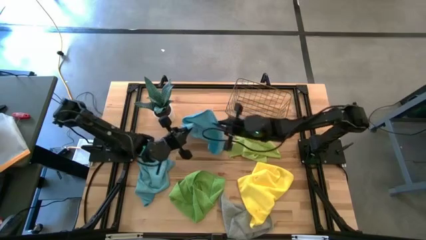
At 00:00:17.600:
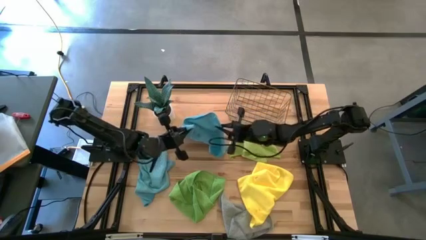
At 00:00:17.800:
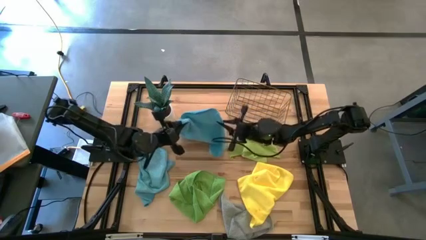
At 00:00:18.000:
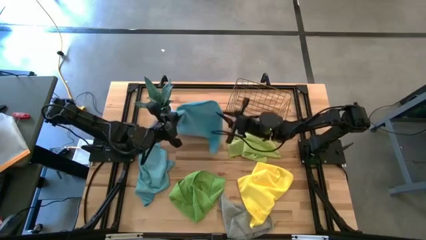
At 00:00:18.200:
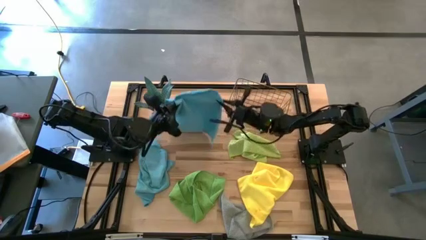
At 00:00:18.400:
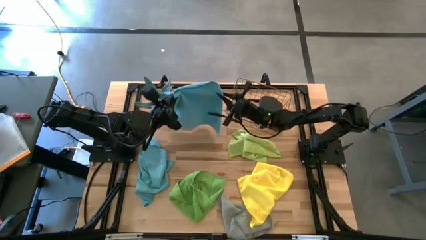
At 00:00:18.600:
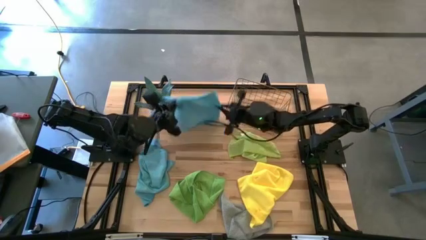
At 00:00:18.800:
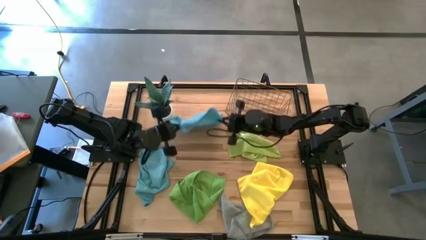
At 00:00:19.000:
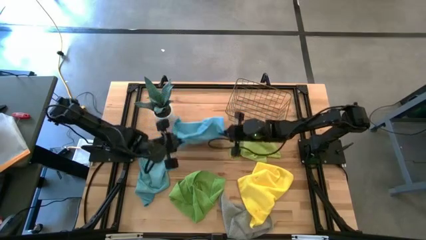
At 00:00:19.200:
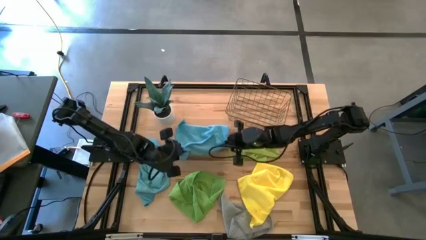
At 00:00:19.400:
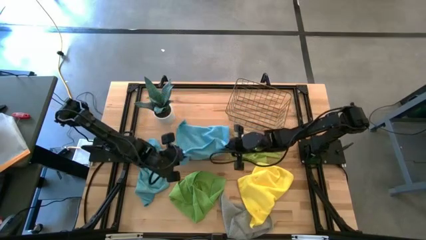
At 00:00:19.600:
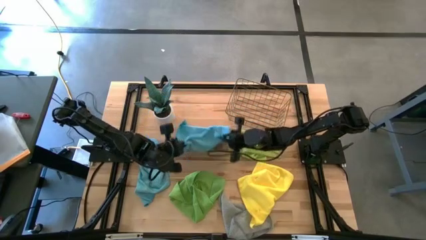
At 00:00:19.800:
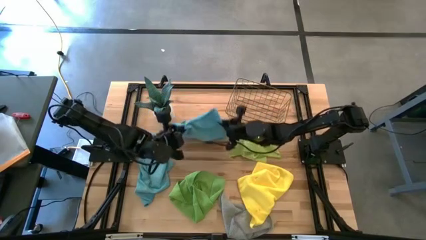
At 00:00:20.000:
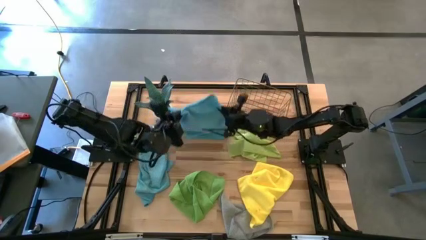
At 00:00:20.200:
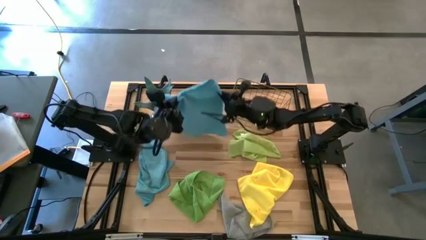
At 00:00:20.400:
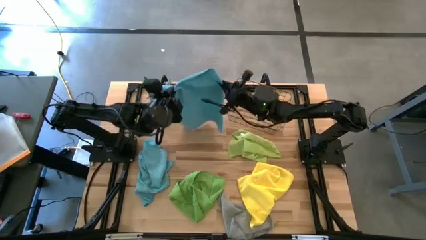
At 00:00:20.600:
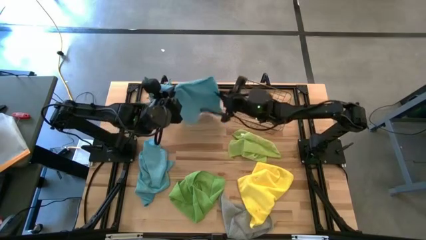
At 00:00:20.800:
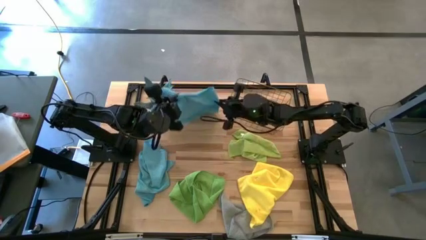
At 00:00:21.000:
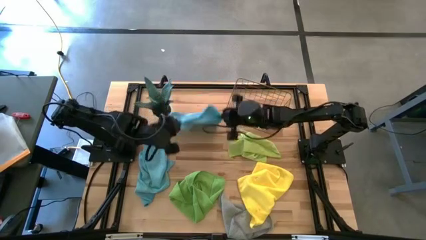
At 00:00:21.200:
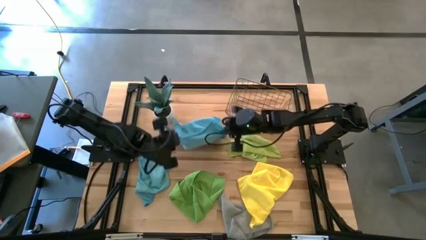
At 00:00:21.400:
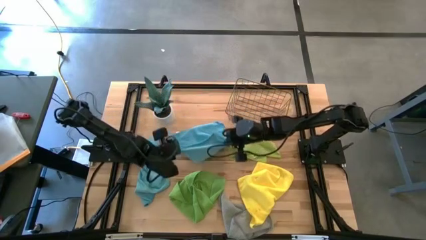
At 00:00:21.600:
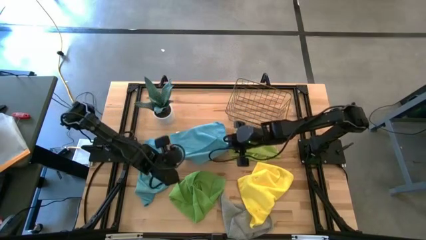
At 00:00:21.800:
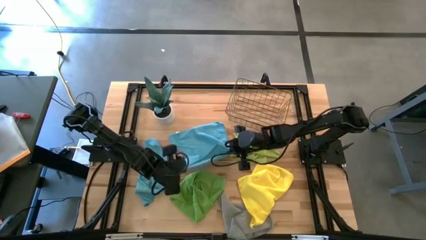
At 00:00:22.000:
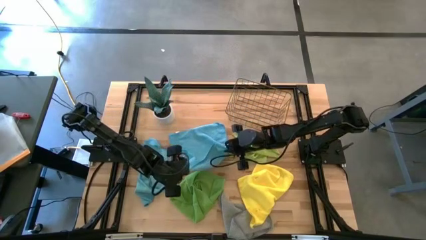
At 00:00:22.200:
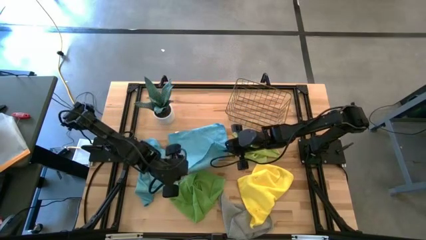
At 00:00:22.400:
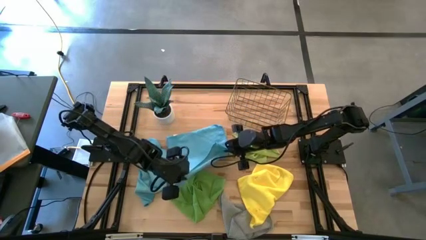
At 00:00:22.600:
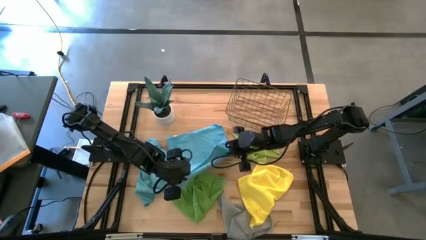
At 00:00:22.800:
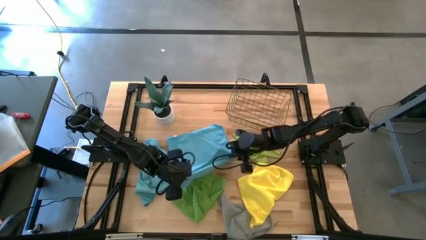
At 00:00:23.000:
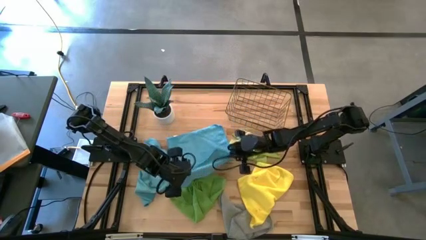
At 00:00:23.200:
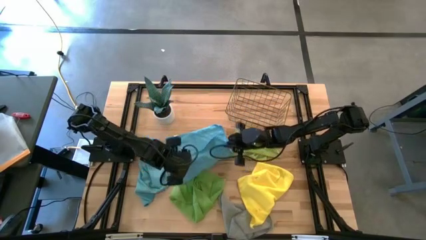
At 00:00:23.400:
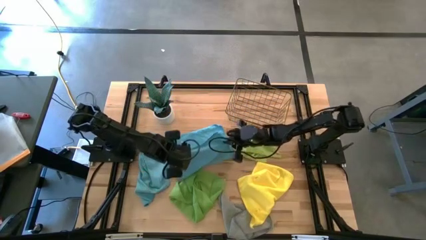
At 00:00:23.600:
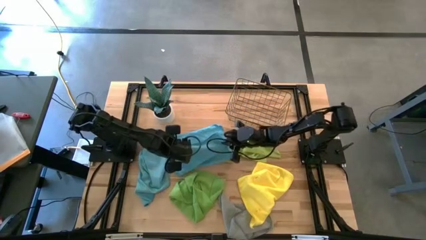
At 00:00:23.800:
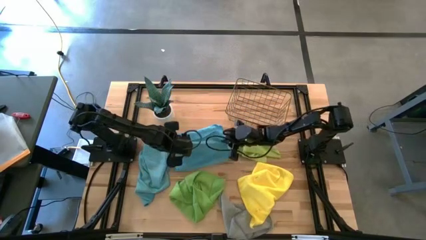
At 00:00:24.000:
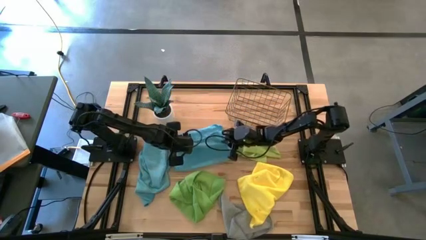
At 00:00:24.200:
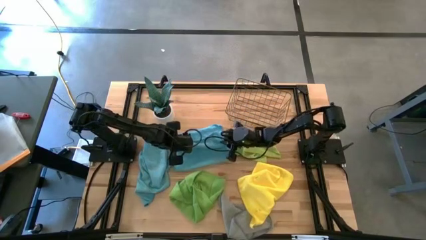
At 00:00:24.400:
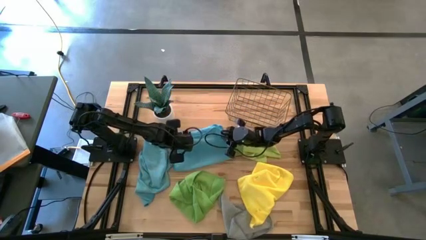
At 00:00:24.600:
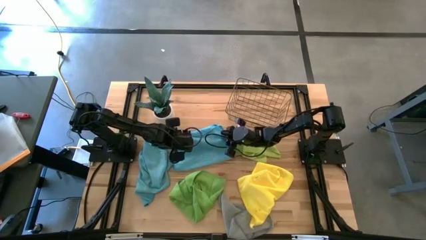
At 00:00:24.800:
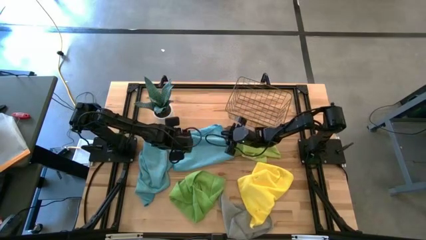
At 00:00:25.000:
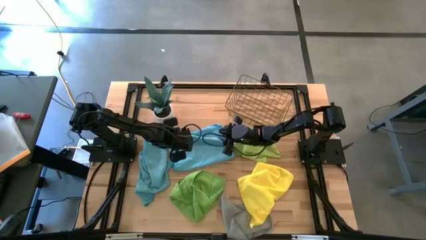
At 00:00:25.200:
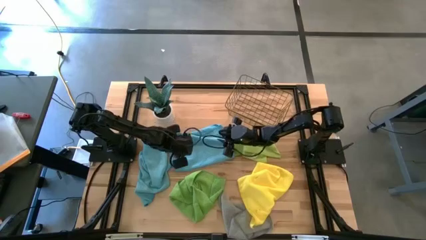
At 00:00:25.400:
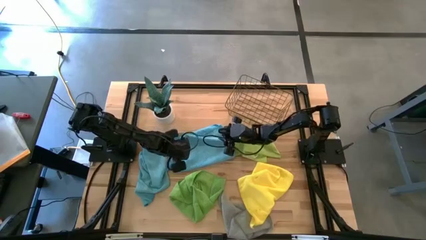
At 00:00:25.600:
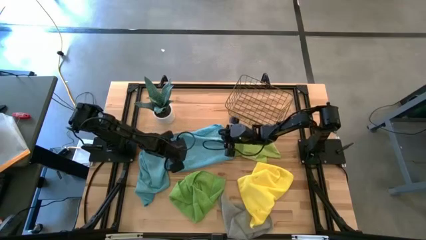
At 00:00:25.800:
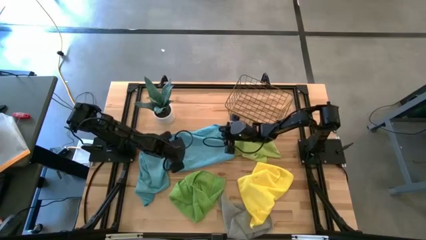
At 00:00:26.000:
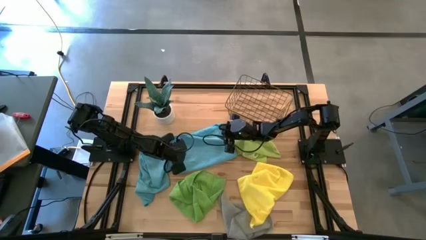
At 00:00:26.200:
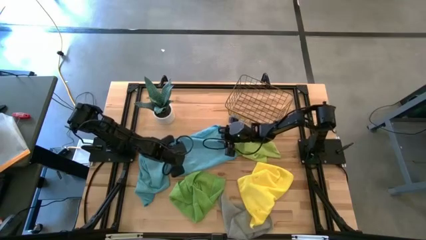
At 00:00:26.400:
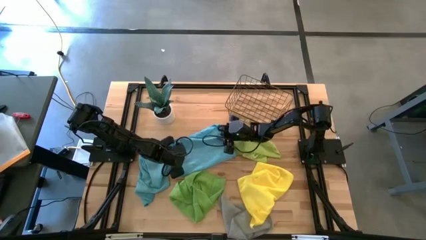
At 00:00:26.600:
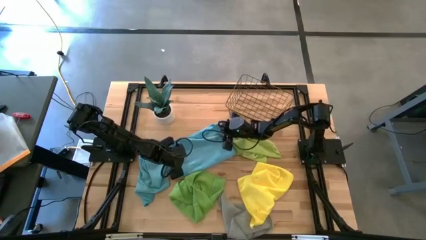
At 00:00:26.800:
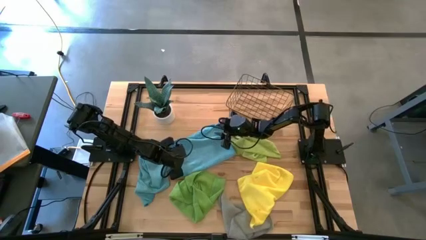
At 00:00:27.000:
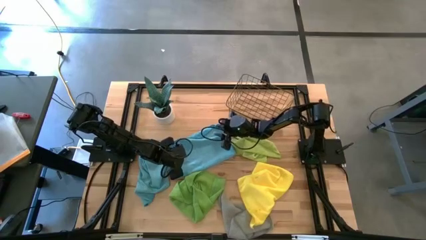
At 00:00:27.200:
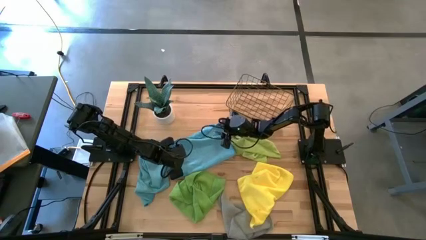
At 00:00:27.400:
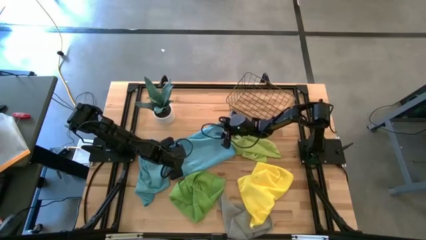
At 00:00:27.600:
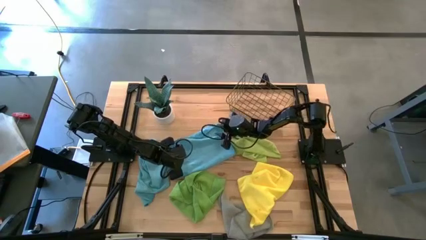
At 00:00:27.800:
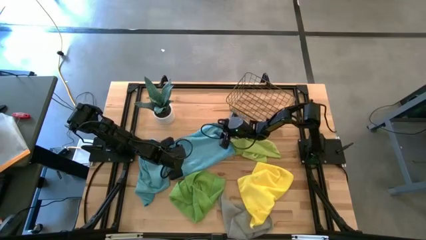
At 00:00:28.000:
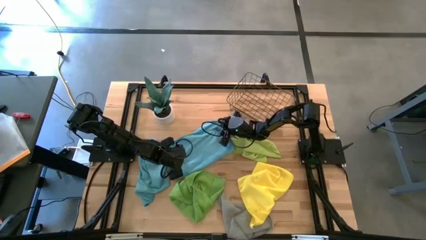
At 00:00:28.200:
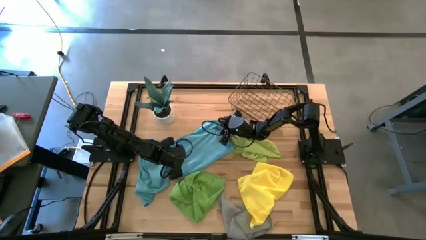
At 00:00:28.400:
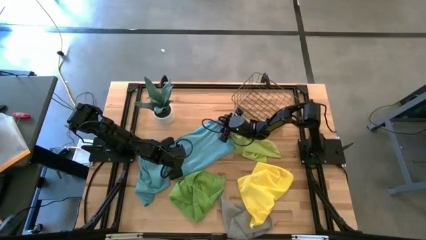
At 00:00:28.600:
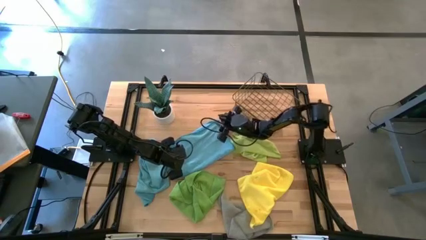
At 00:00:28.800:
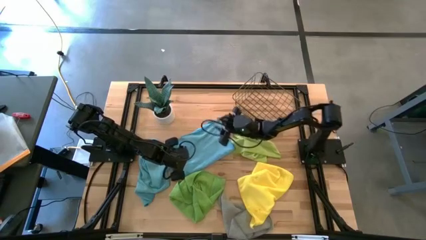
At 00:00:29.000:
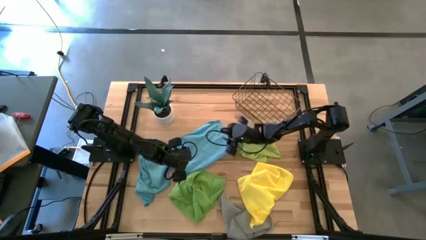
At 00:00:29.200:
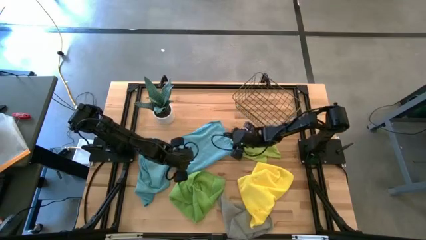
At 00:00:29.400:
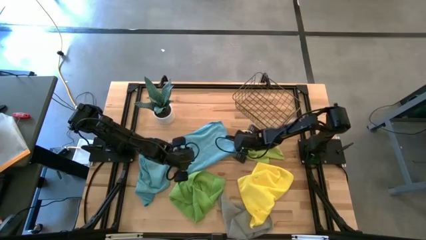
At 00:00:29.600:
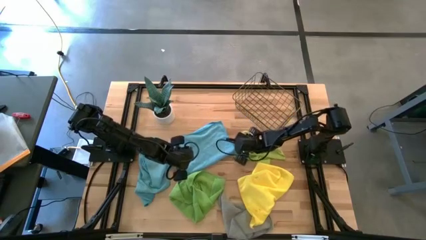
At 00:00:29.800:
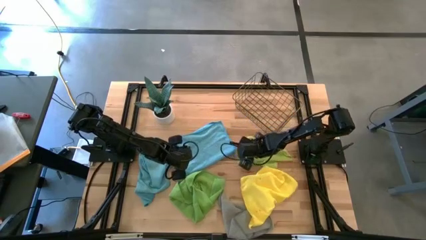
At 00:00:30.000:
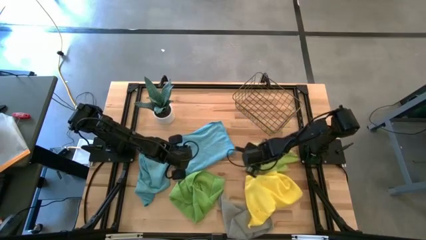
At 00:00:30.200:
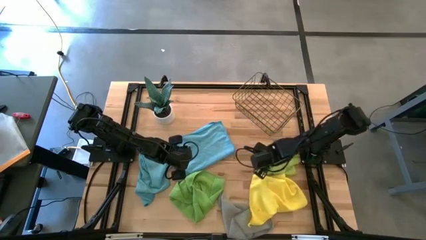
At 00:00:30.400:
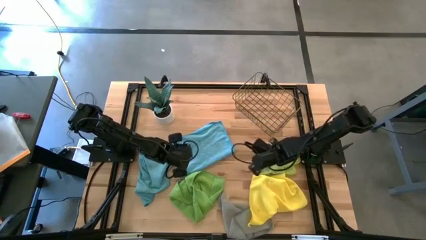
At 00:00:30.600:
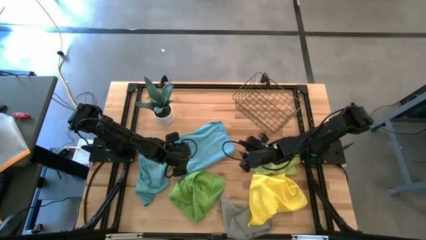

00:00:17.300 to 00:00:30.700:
Task: Fold microfiber towels
Fold the top blue towel
